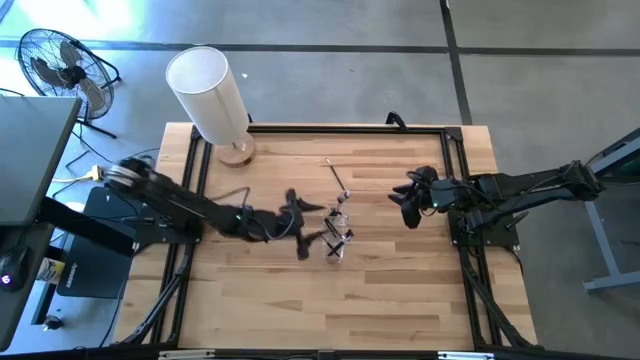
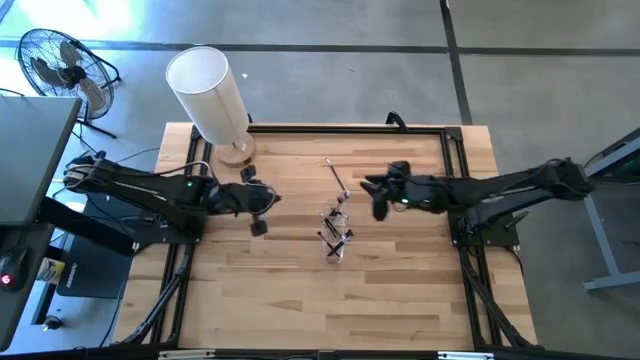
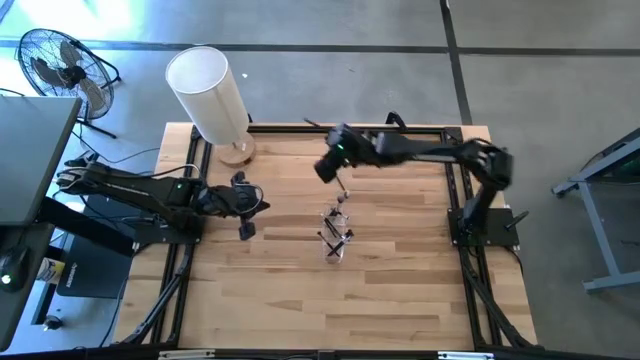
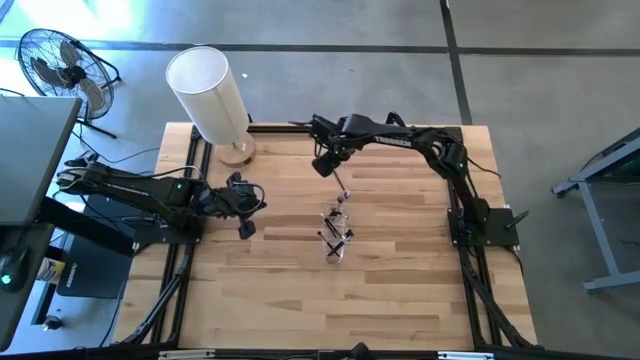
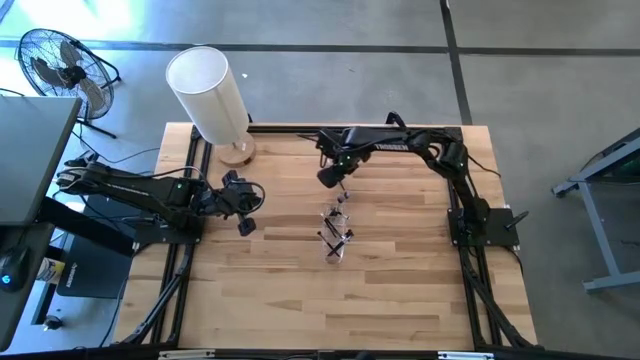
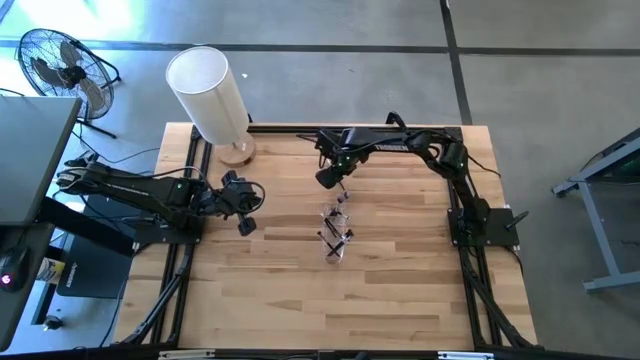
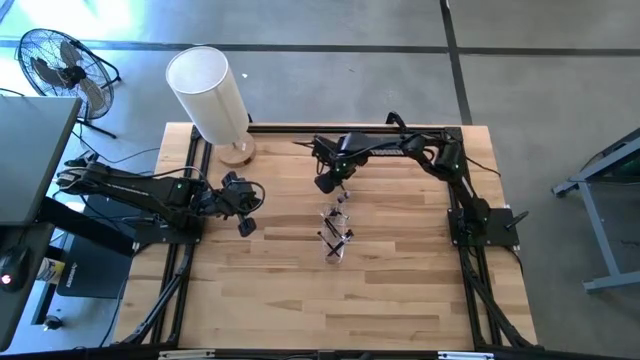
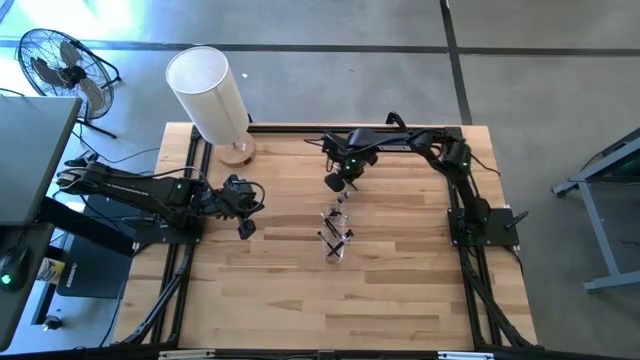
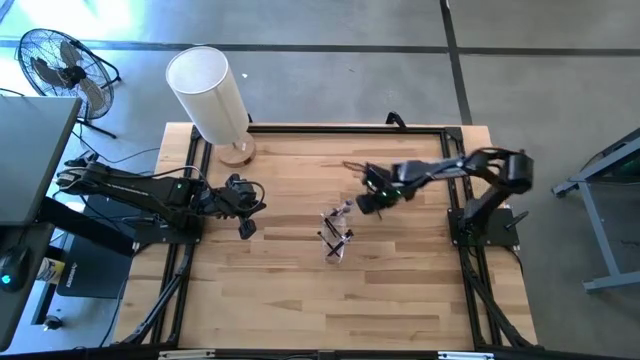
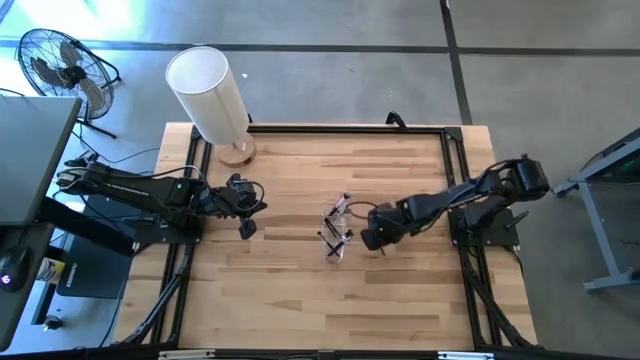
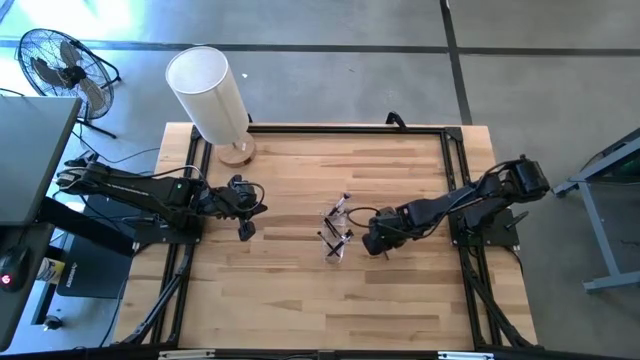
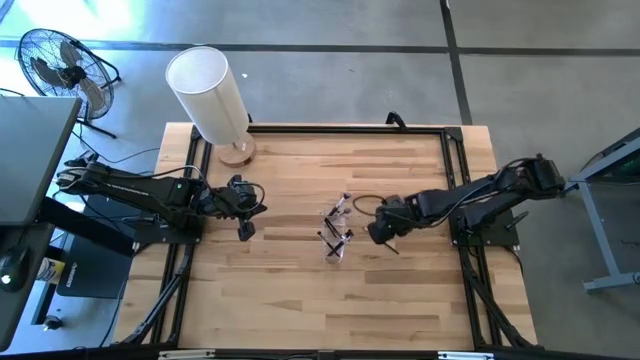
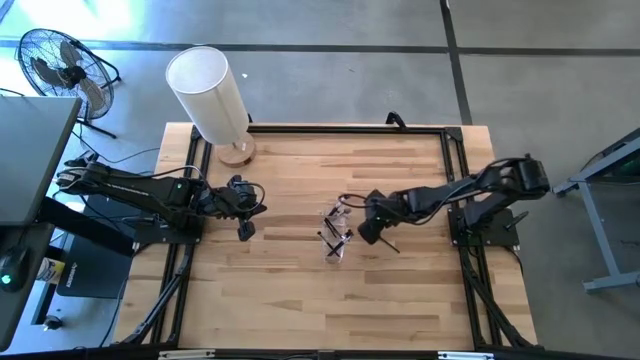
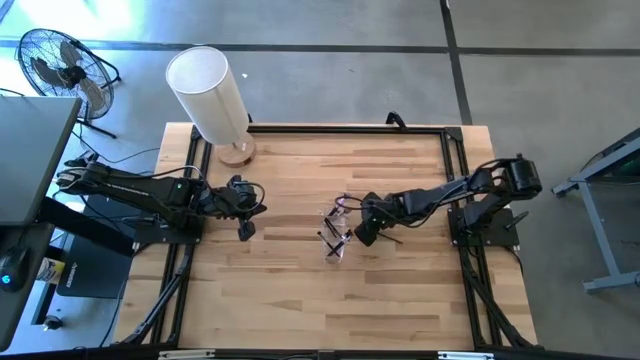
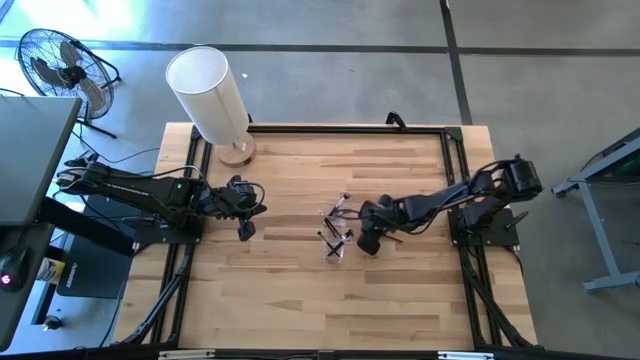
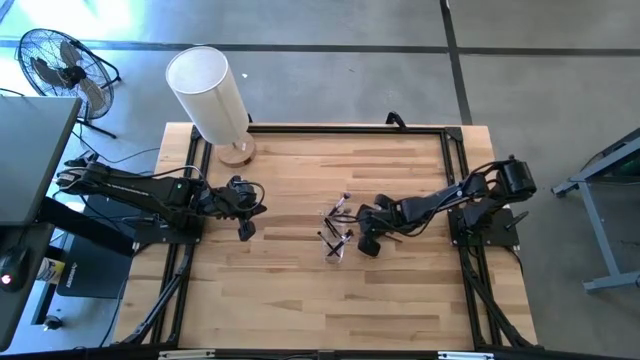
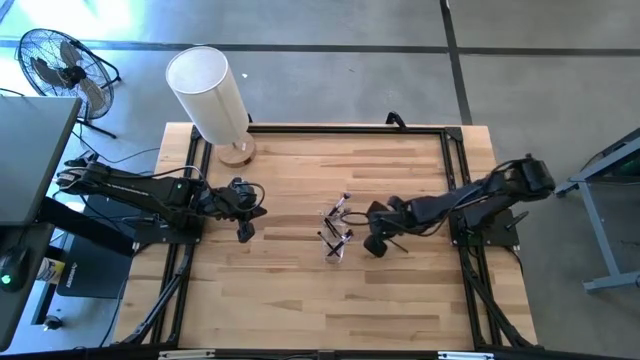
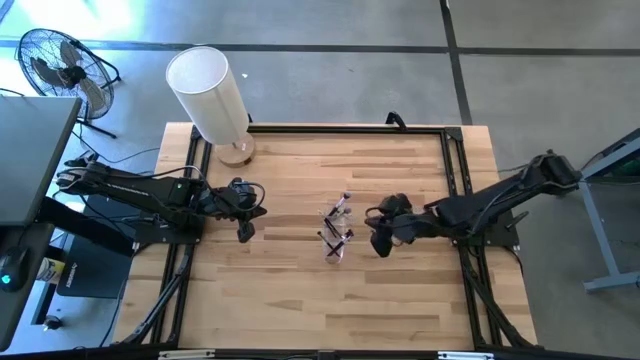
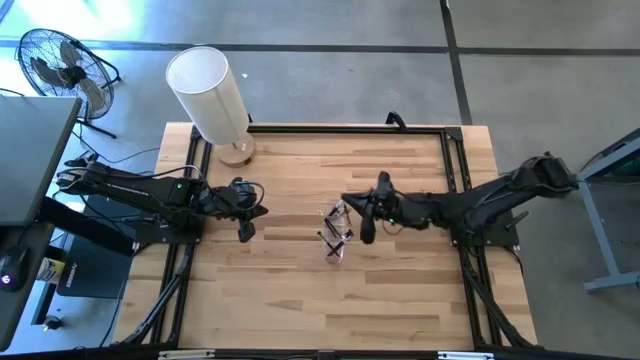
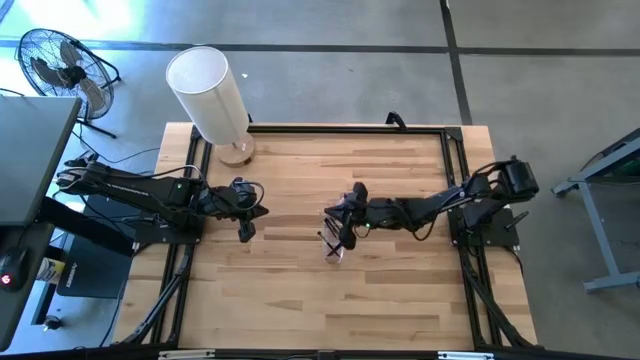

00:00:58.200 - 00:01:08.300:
Task: Pick & Place Makeup Brushes
Put the eyeshadow brush into the transparent organizer

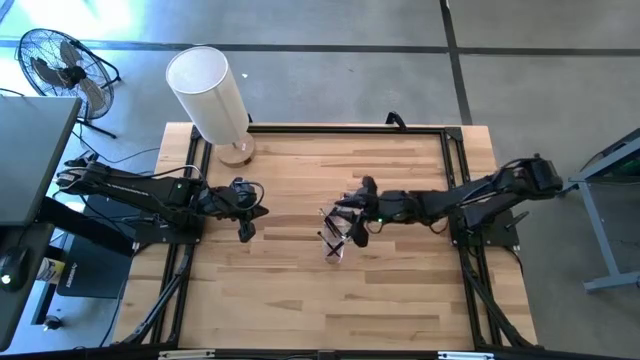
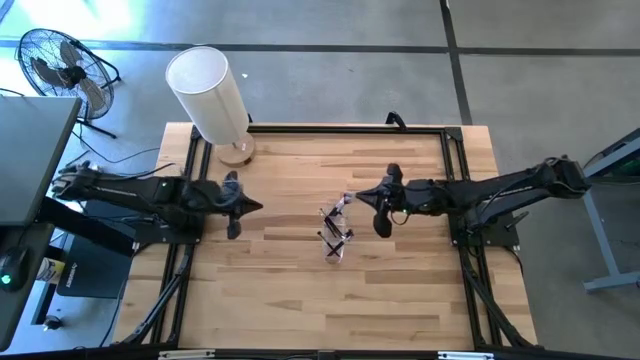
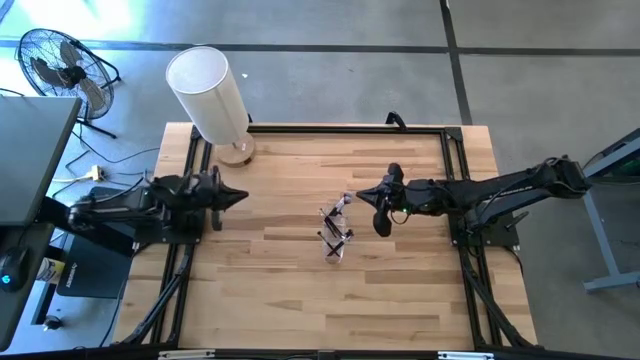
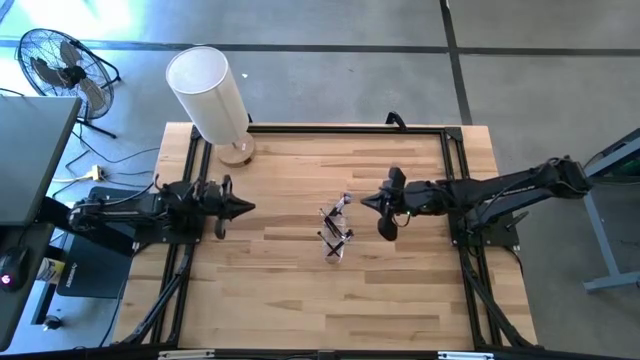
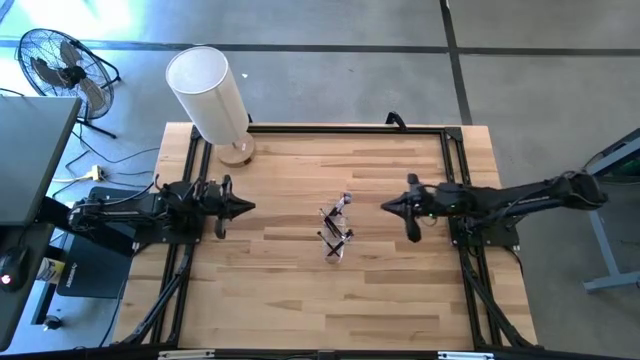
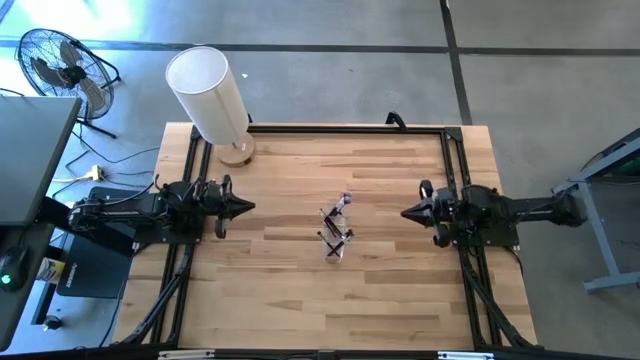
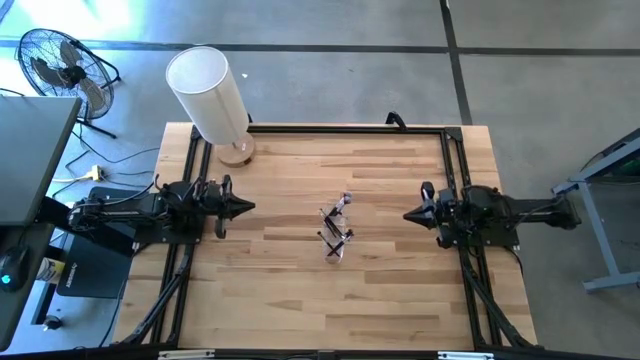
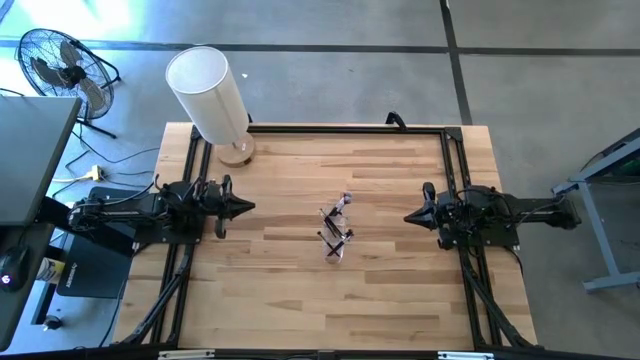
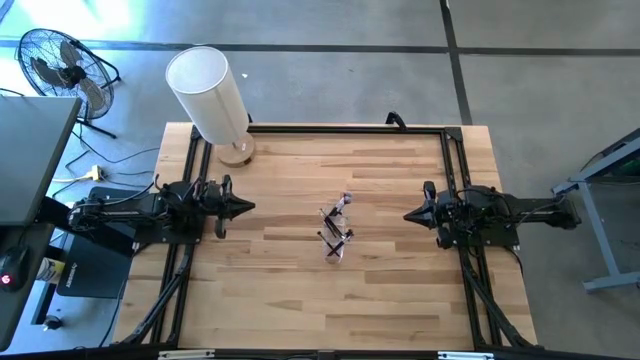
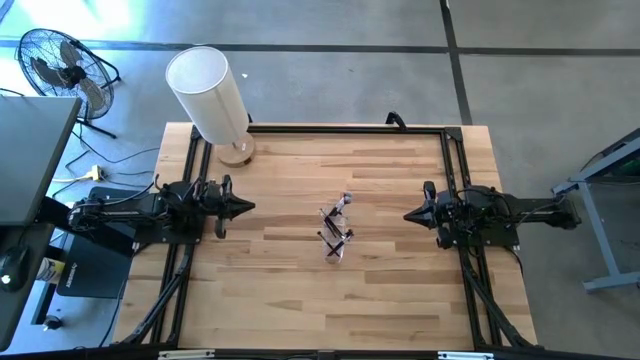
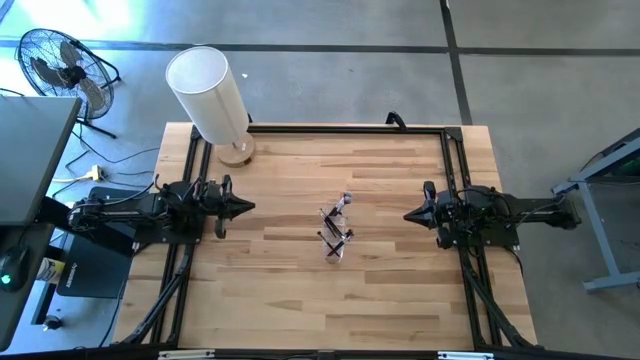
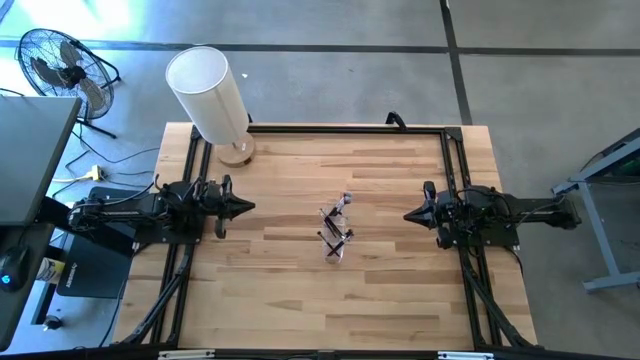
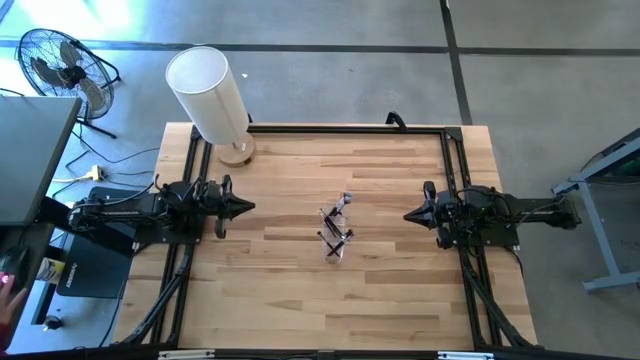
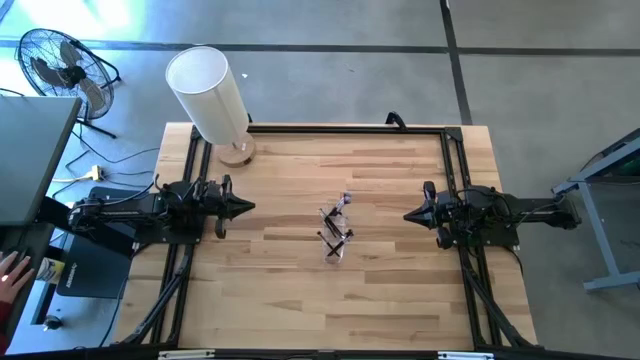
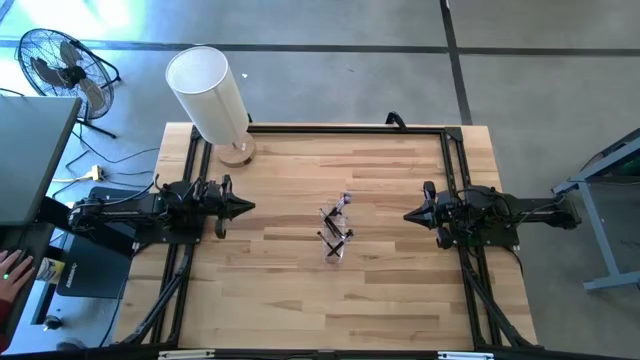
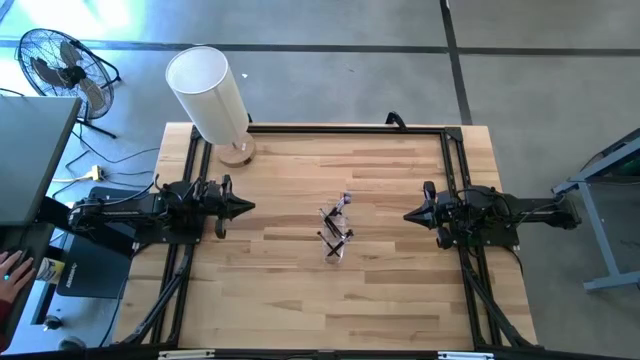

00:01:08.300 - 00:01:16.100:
Return to Home Position

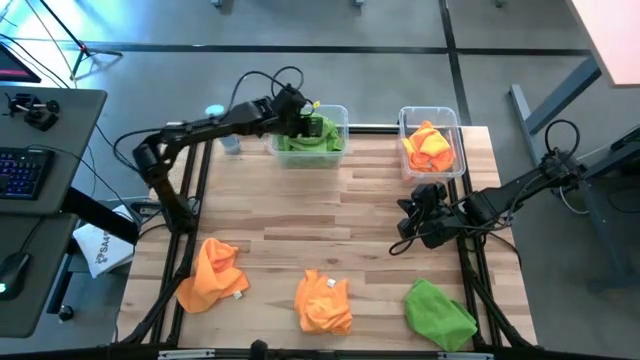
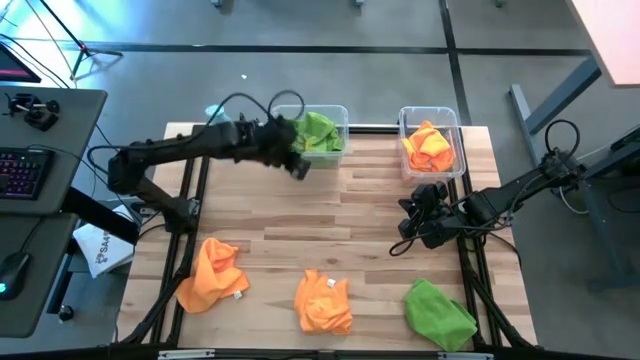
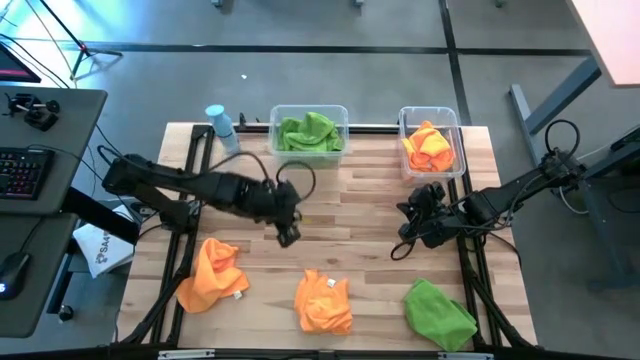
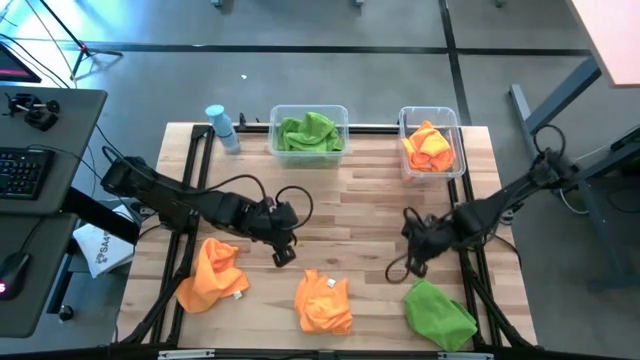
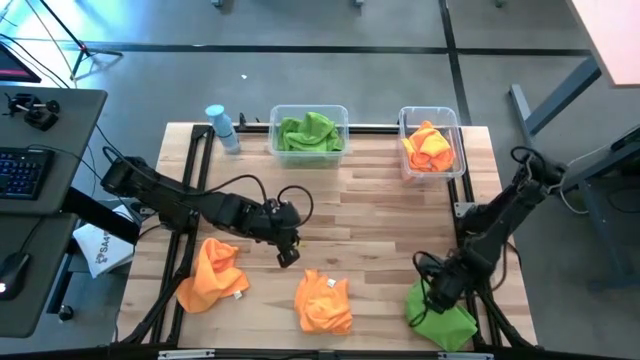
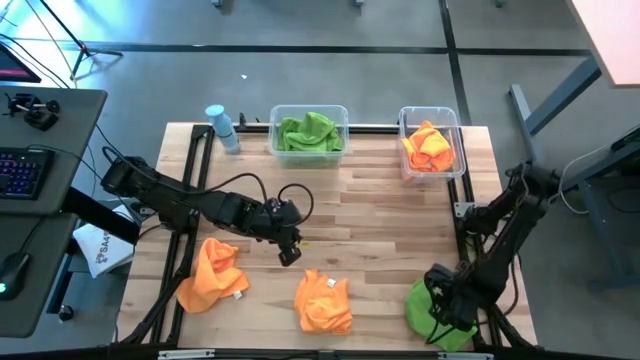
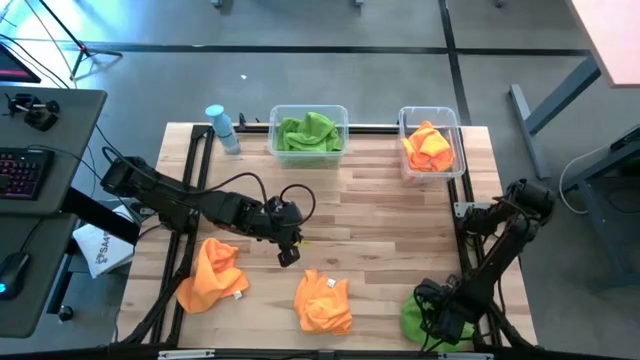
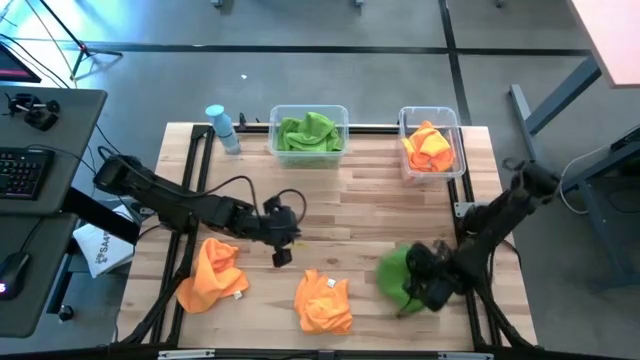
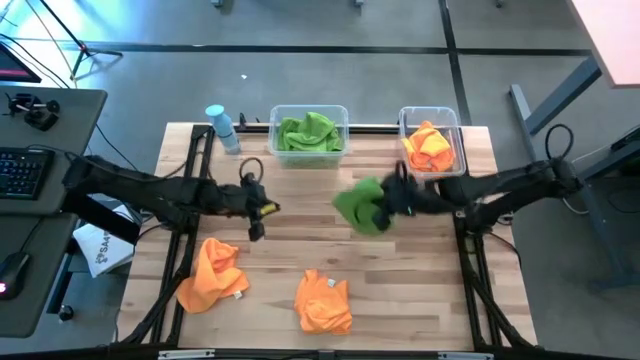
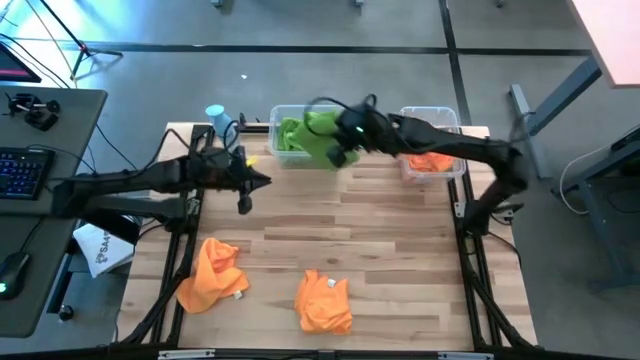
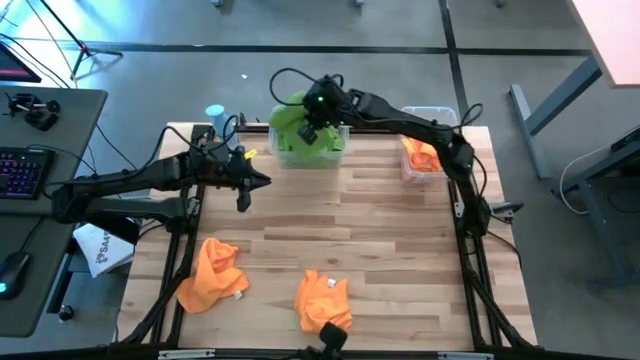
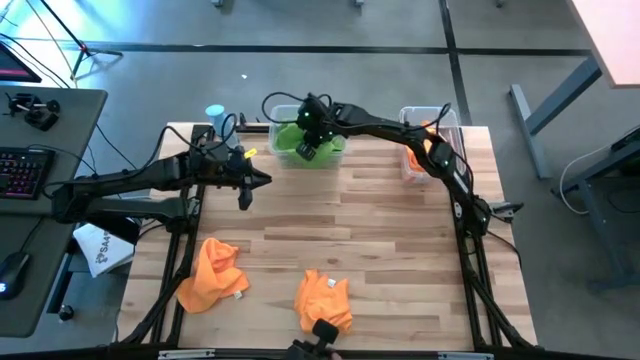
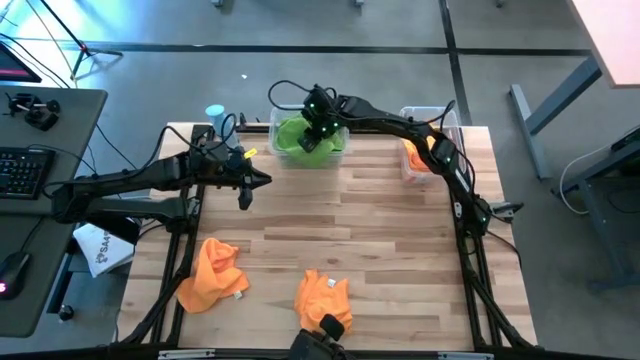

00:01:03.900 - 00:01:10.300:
Task: Sort microfiber towel by color & place in baskets
Put the green towel into the left transparent bin
